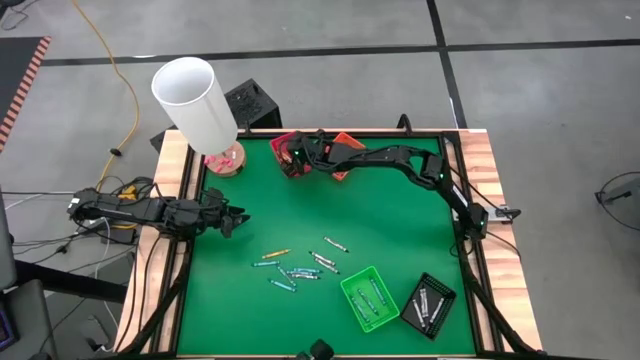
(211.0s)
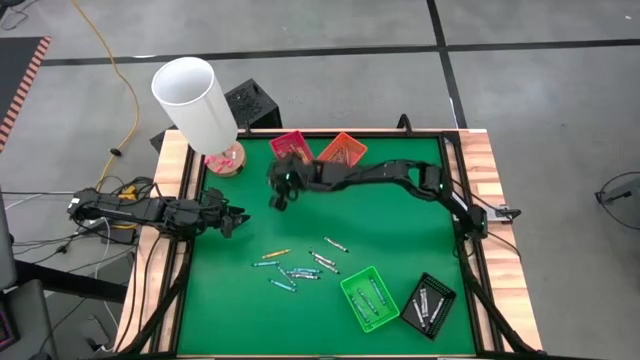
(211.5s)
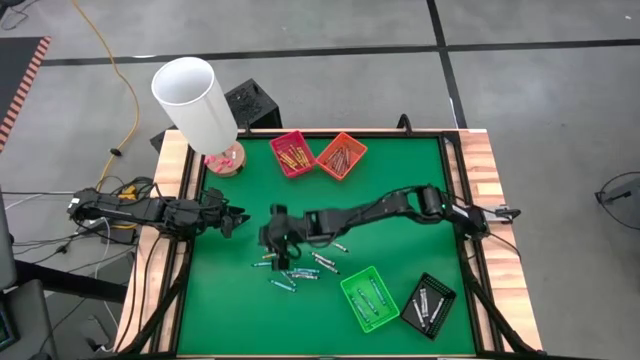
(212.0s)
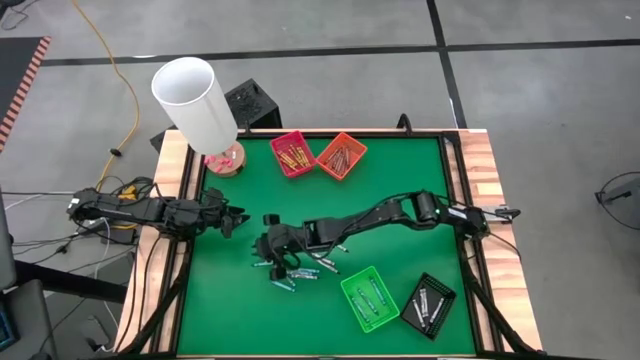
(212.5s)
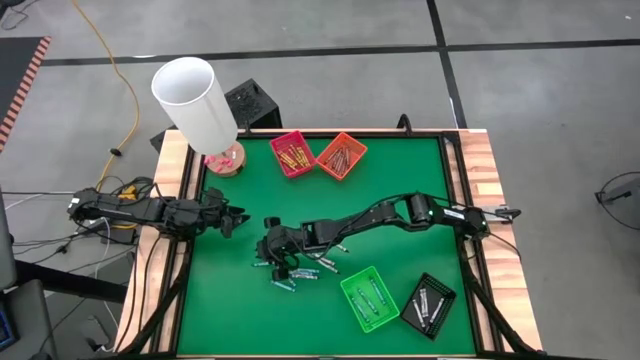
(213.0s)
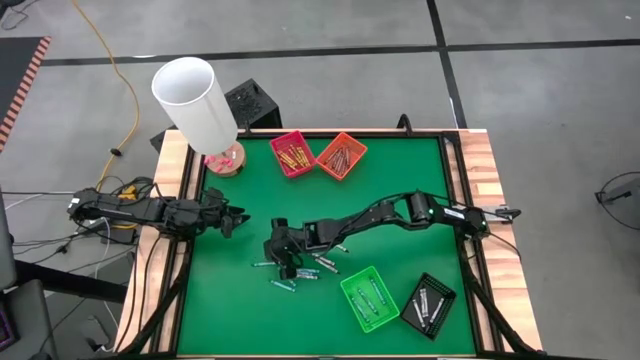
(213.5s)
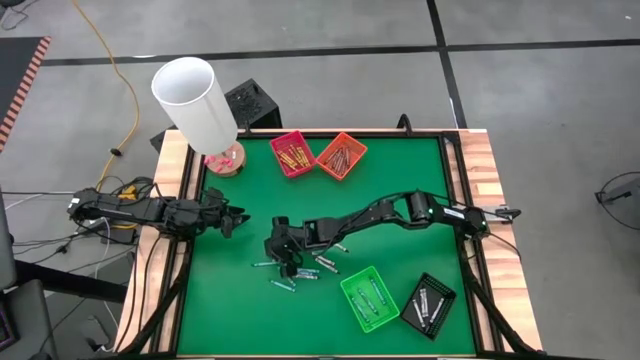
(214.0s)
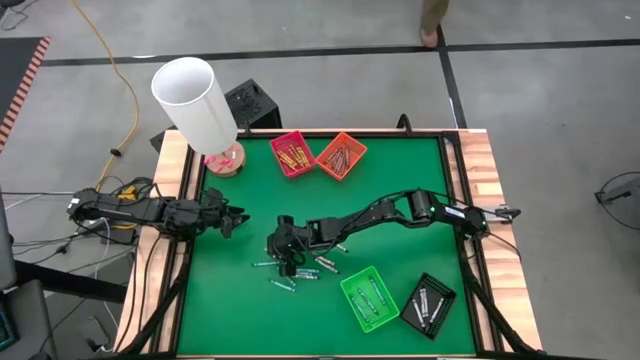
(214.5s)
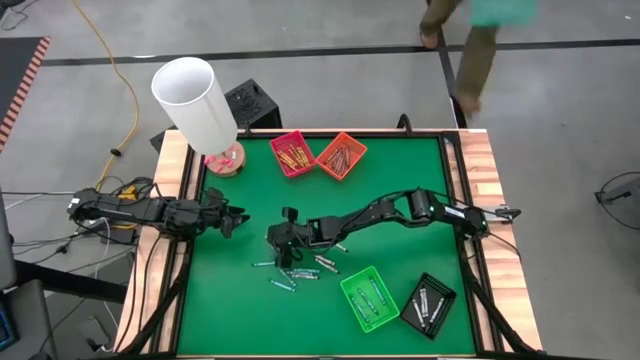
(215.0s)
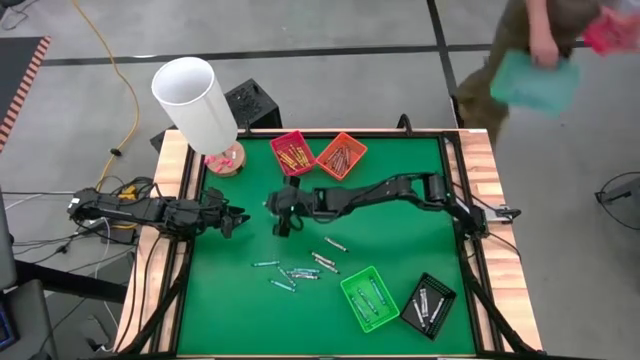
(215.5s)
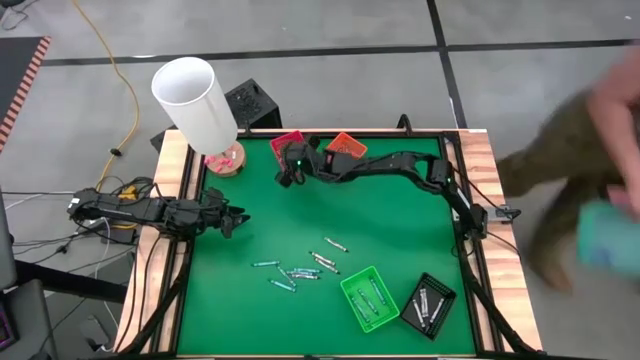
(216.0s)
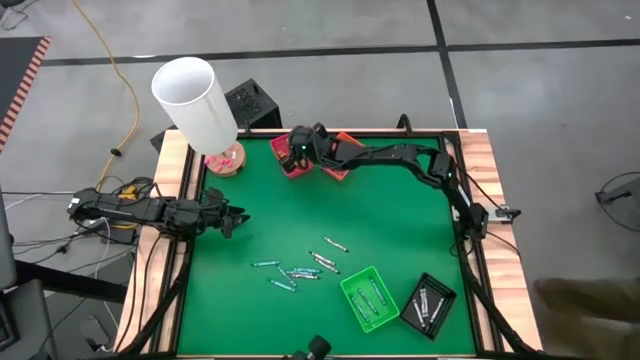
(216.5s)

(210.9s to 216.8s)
Task: Sort crayons
Put the light green crayon into the red bin

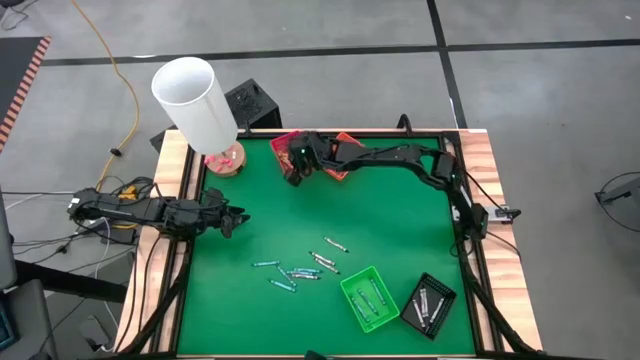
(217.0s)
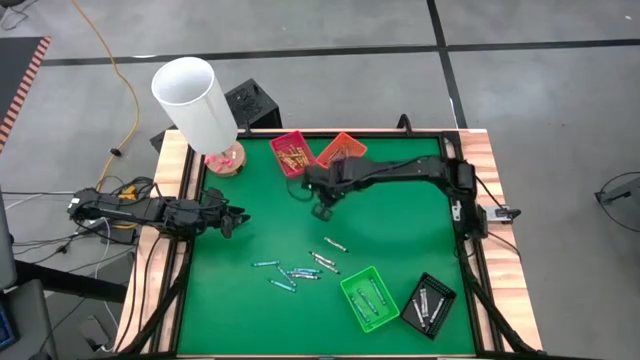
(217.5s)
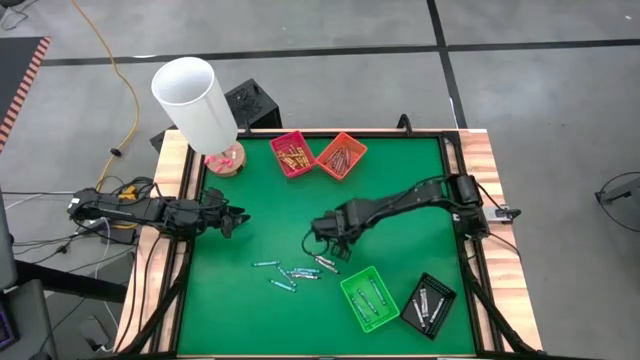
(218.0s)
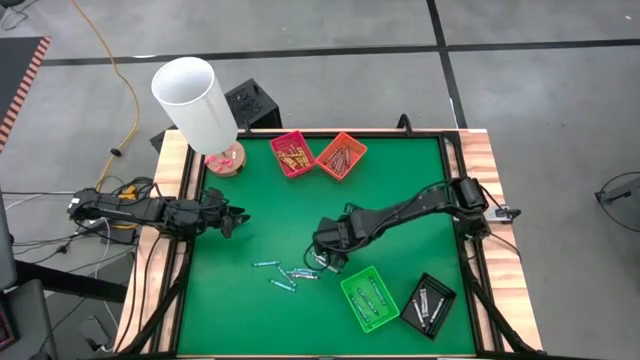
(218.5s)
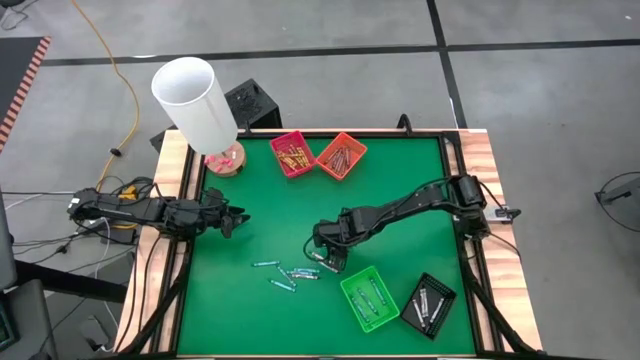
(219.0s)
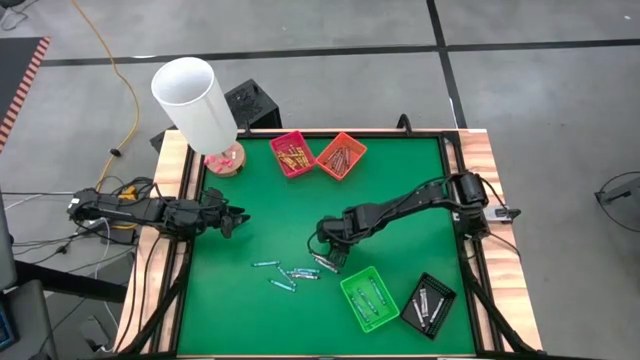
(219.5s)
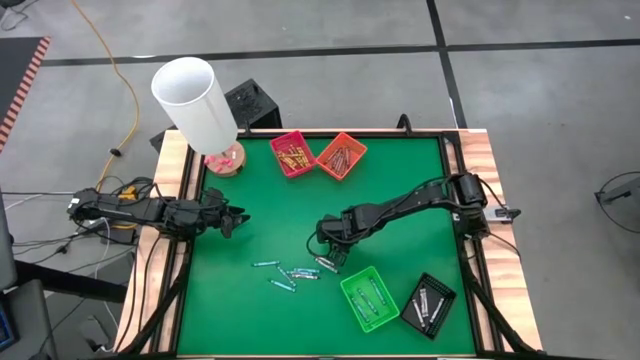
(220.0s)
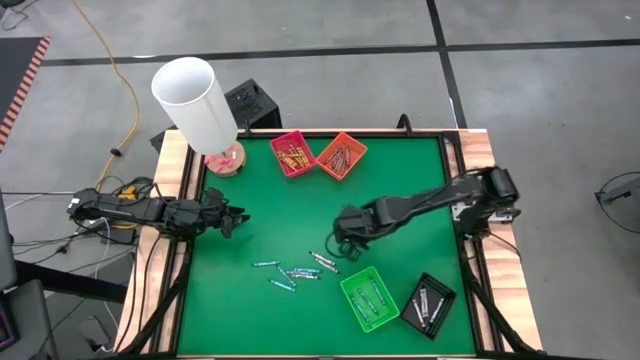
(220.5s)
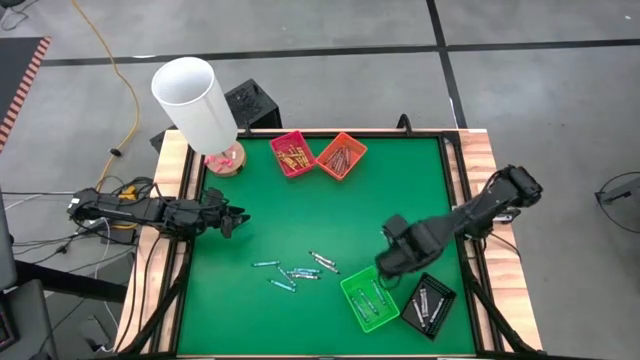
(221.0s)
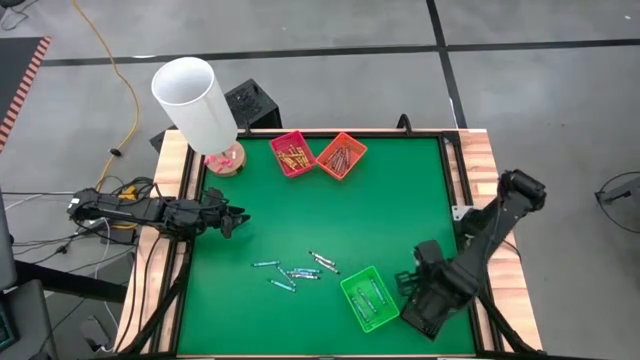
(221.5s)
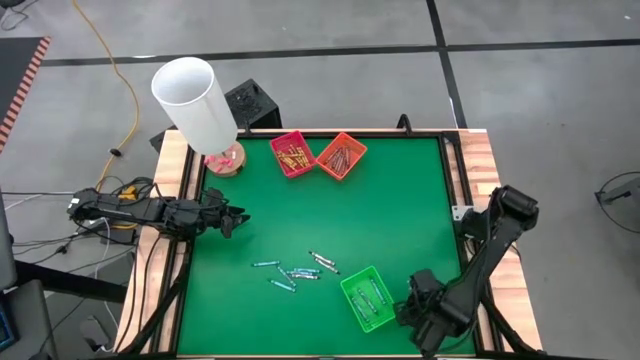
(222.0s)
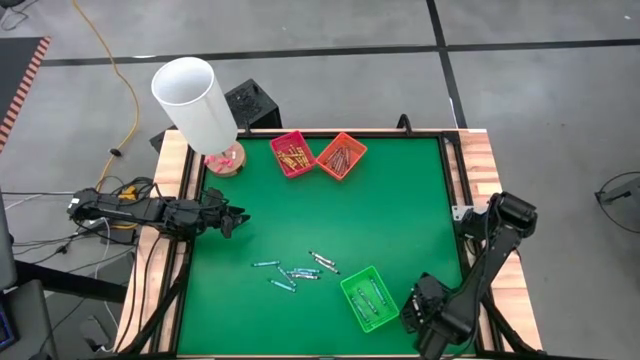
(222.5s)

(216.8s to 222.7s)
Put the black crayon into the black bin

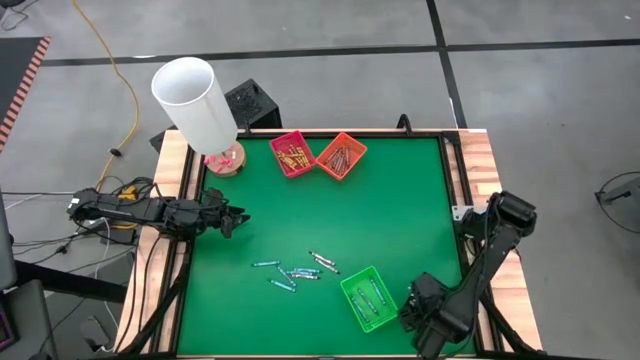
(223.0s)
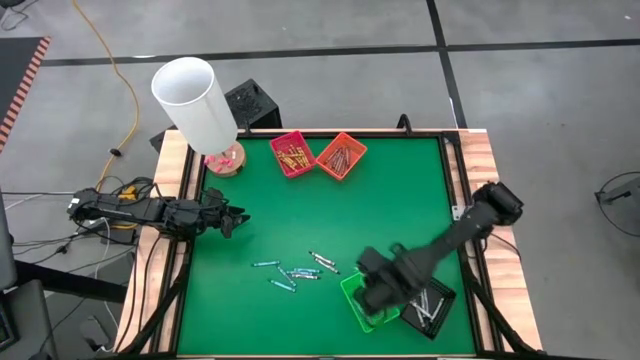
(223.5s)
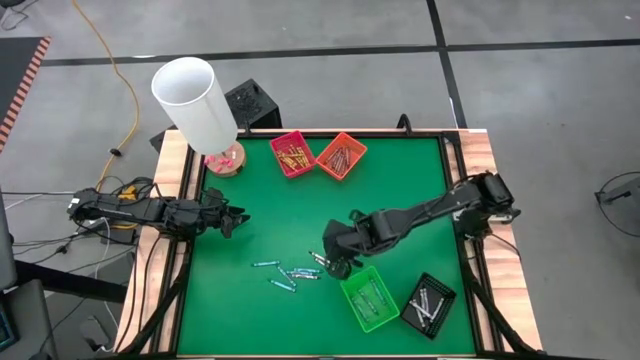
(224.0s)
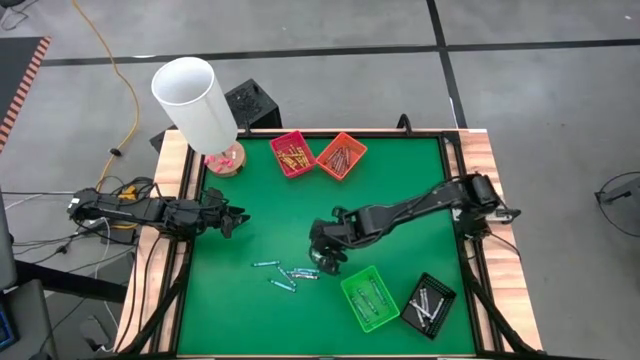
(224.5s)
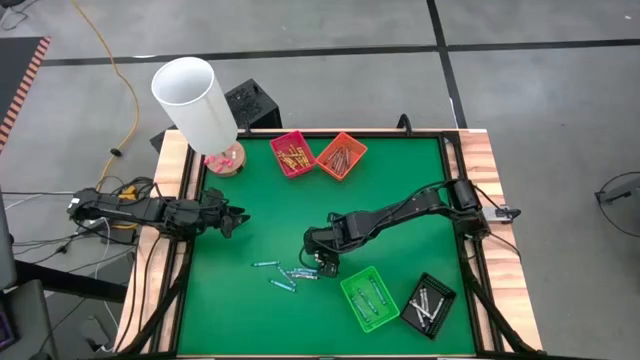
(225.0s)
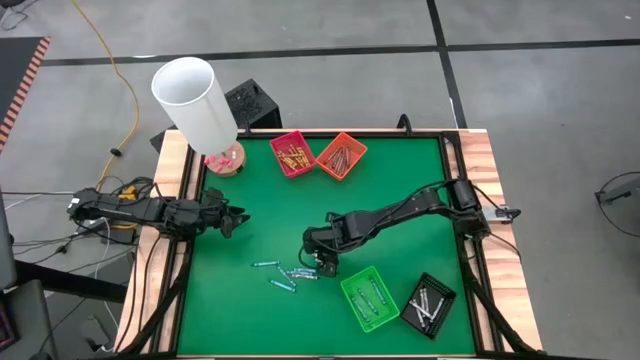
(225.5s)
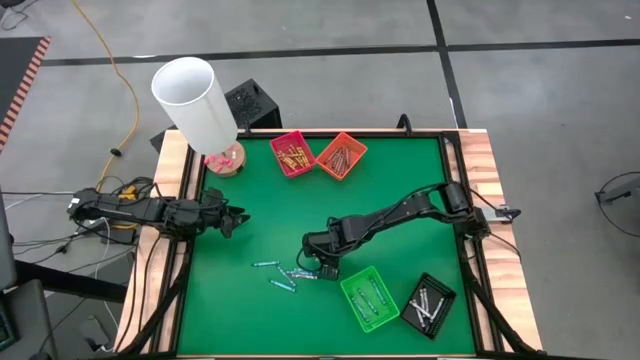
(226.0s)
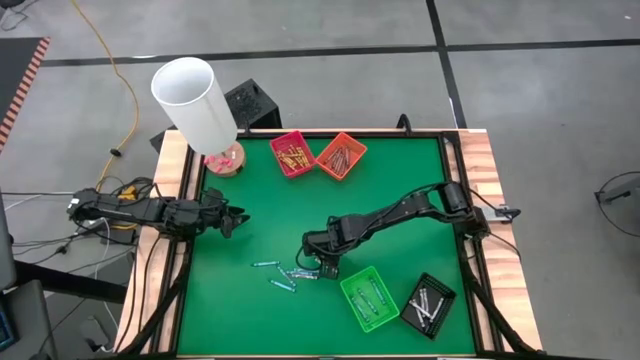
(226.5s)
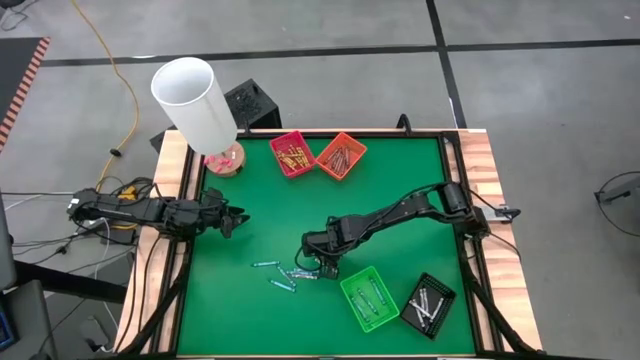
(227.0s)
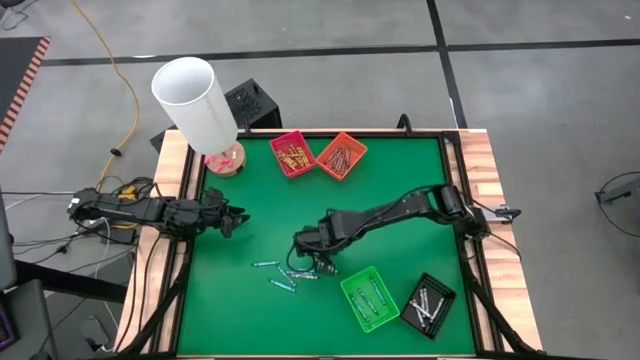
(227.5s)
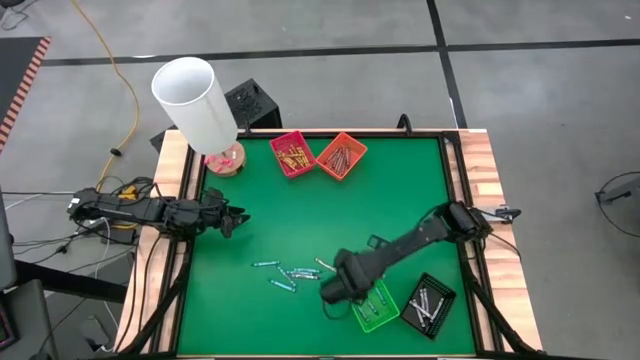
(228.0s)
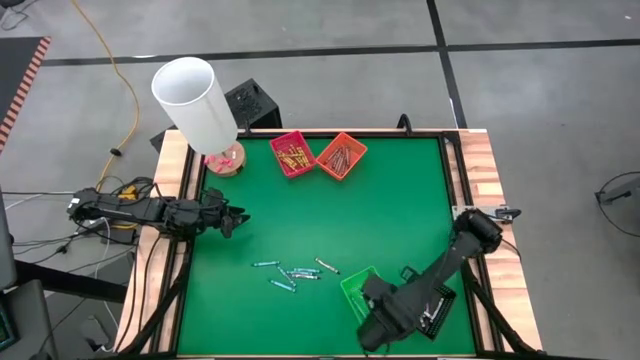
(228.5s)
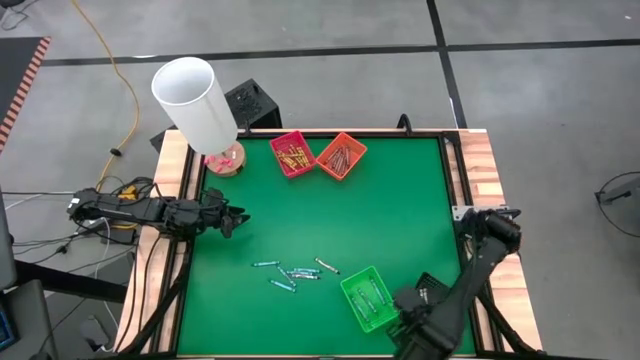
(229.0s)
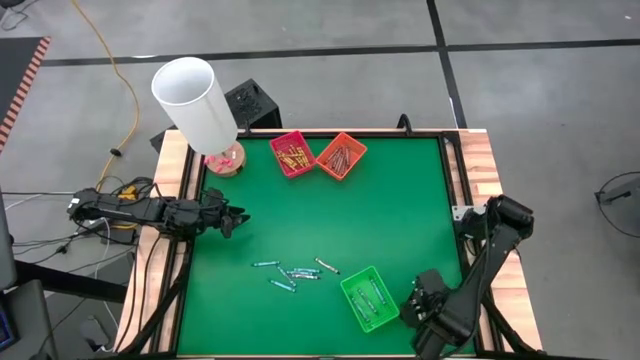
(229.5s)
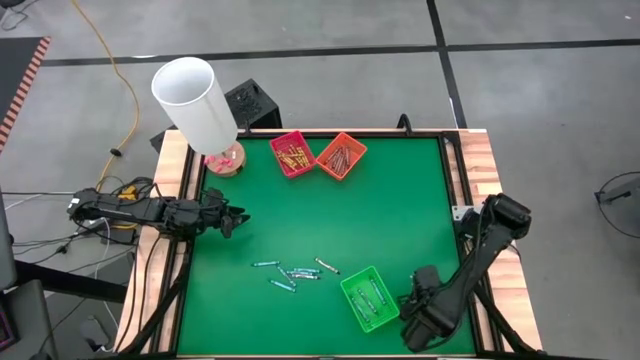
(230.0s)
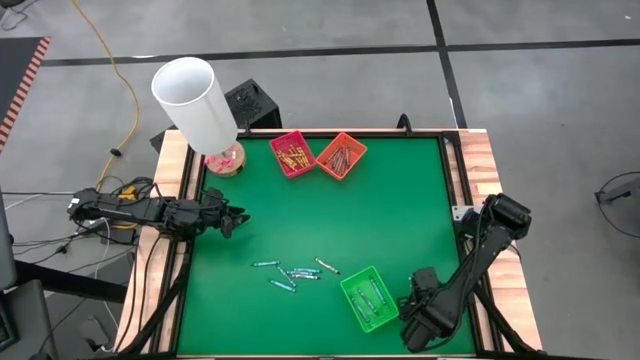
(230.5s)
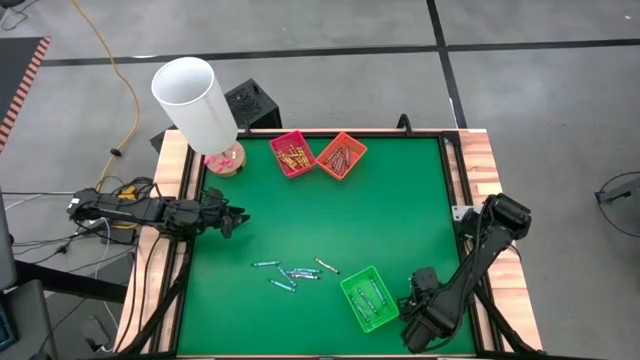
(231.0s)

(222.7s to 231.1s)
Put the black crayon into the black bin

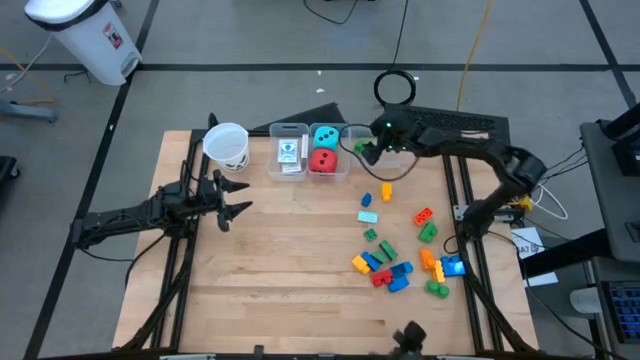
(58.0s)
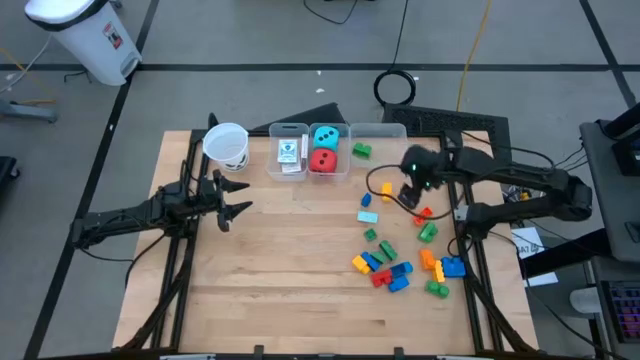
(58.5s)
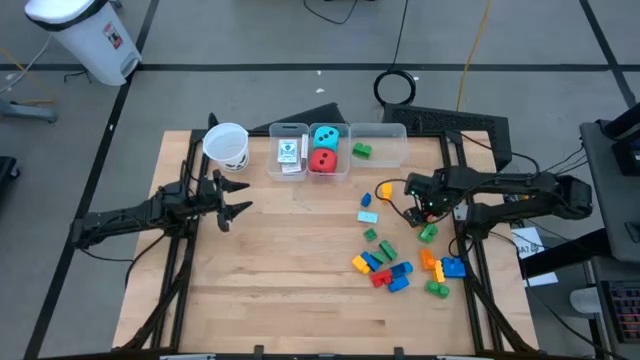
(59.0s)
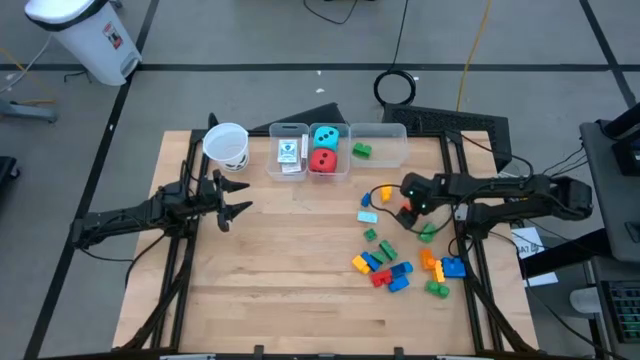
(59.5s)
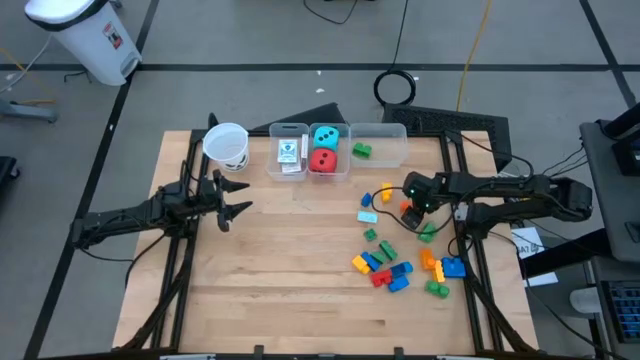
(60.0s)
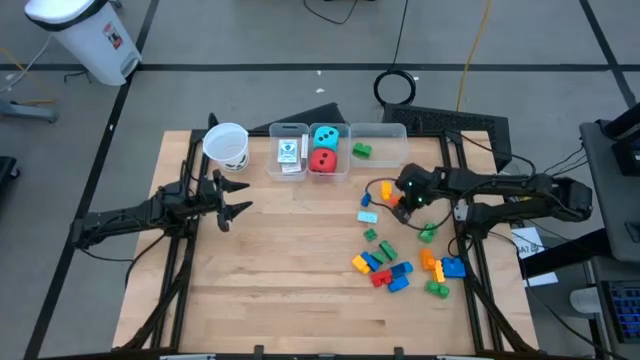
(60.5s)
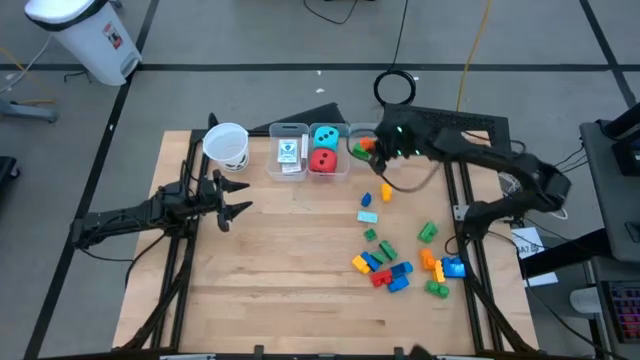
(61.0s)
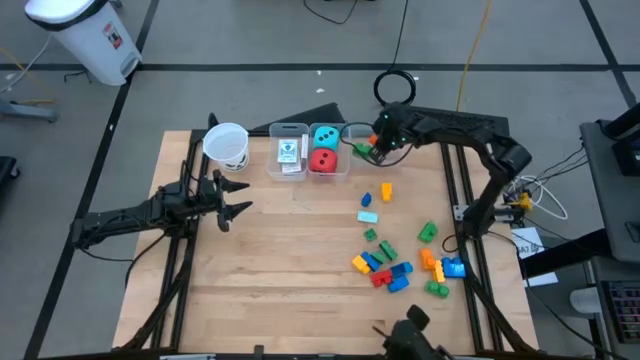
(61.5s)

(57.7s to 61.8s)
Task: Pick & Place Toys
Put the orange game piece into the right transparent bin
